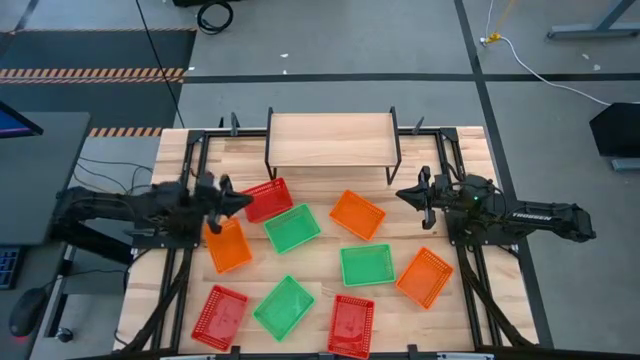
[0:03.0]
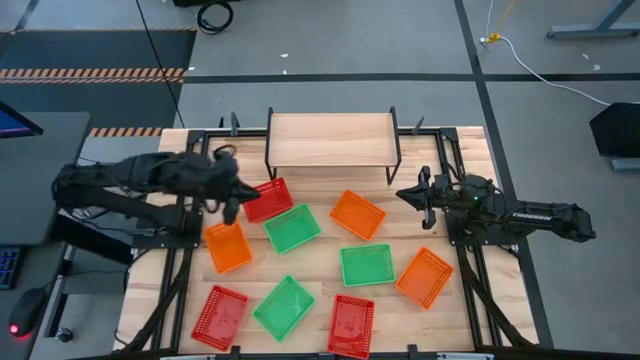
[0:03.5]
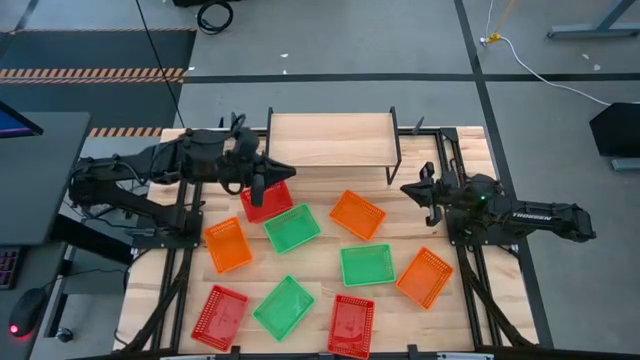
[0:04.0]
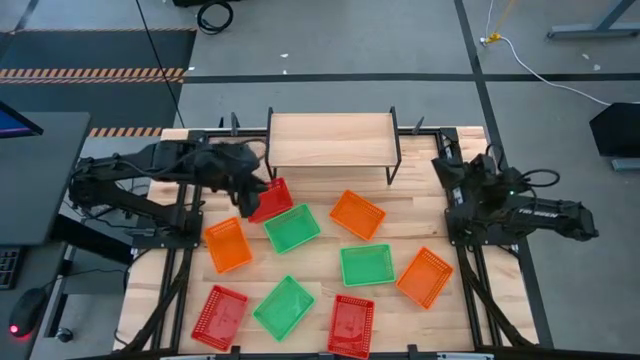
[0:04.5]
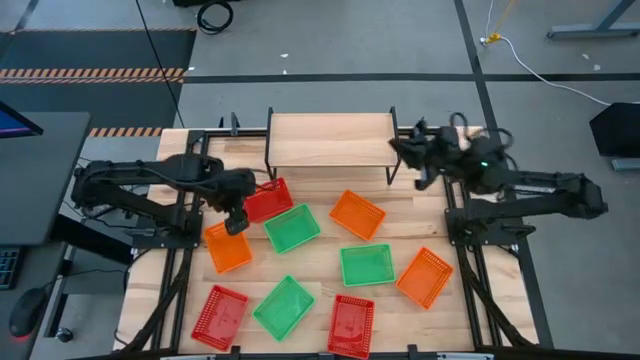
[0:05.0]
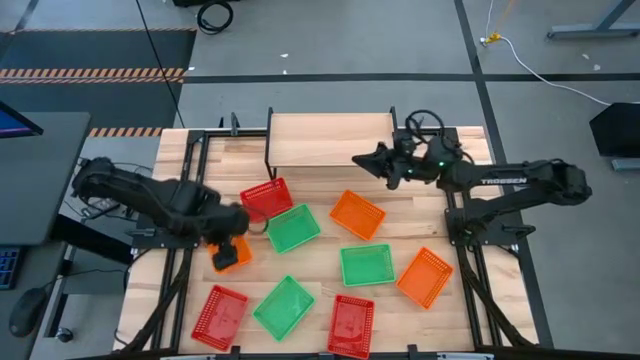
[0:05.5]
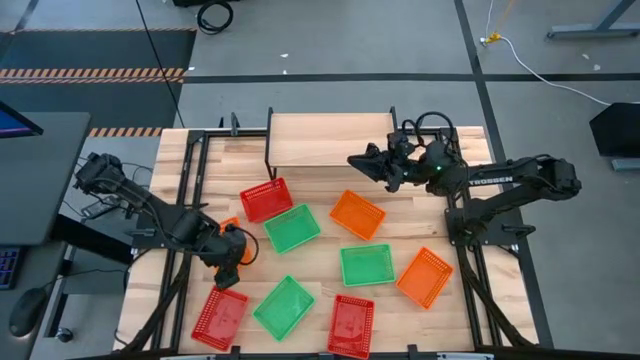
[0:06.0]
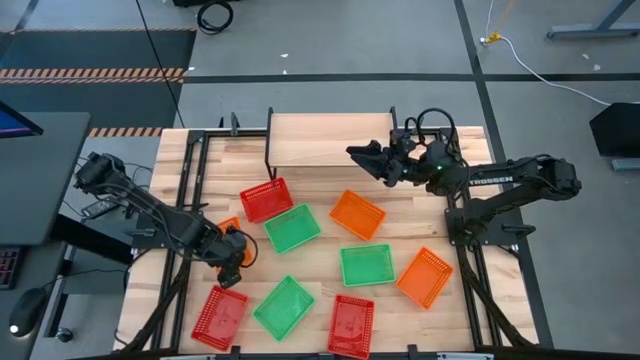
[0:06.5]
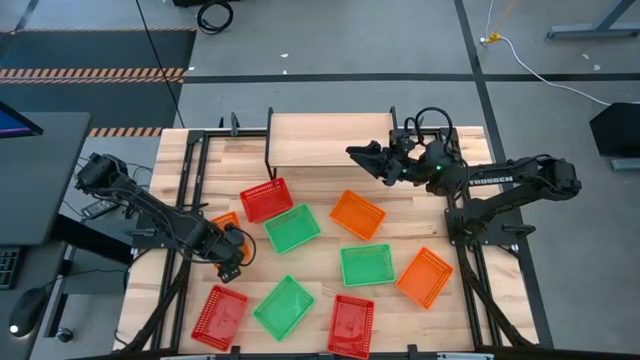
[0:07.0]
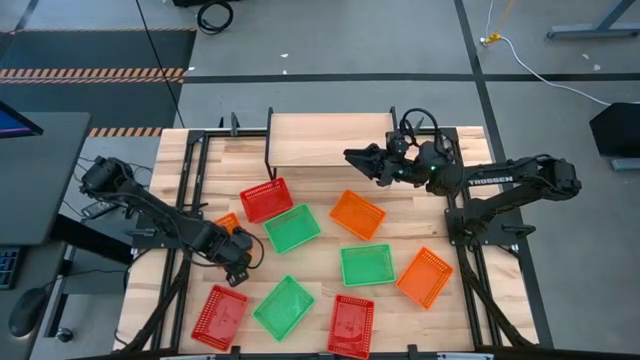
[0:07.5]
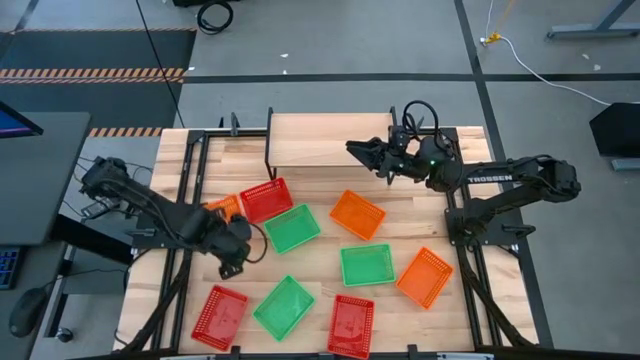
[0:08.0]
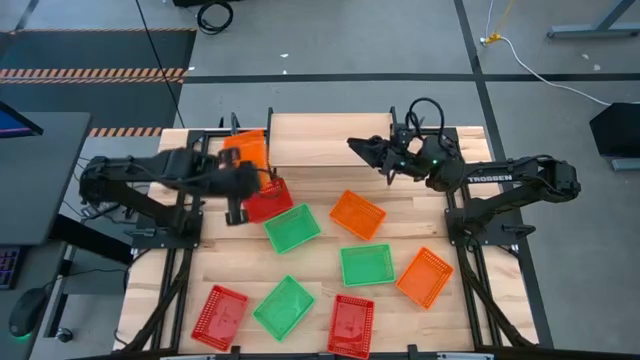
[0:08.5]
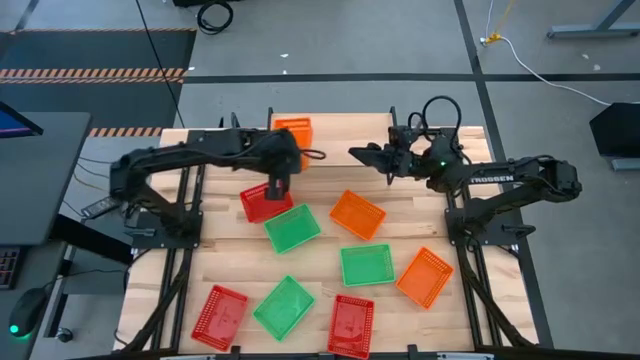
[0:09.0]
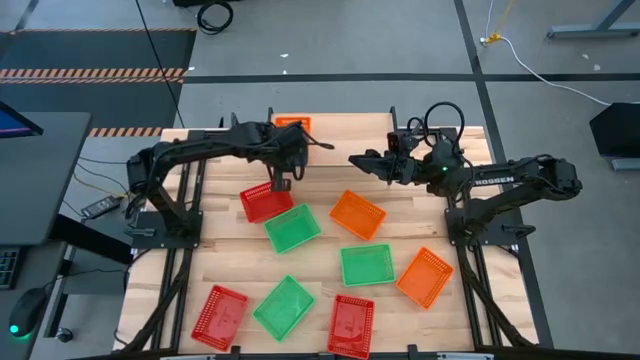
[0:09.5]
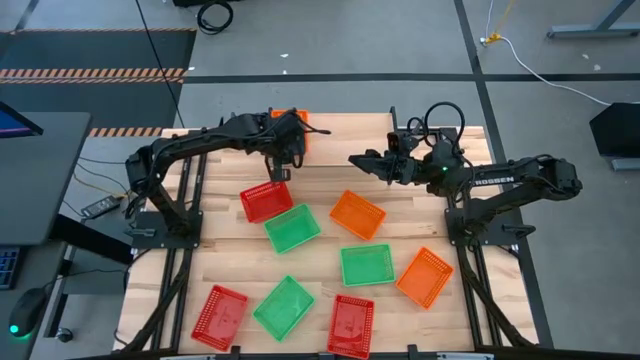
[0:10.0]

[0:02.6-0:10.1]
Task: Stack baskets on shelf by color
Put the top left orange bin on the shelf

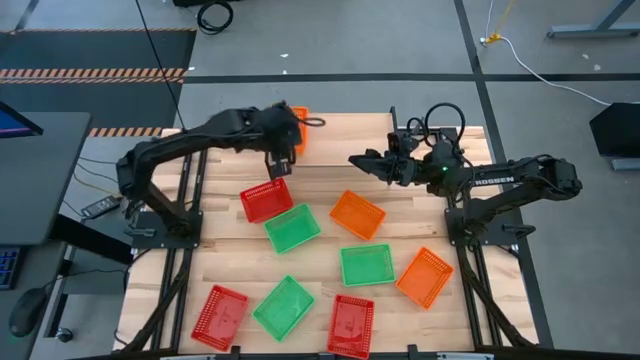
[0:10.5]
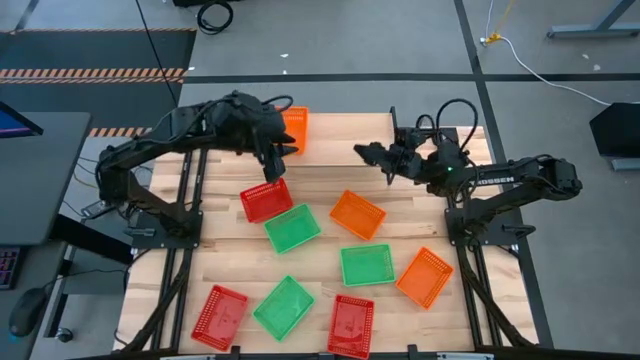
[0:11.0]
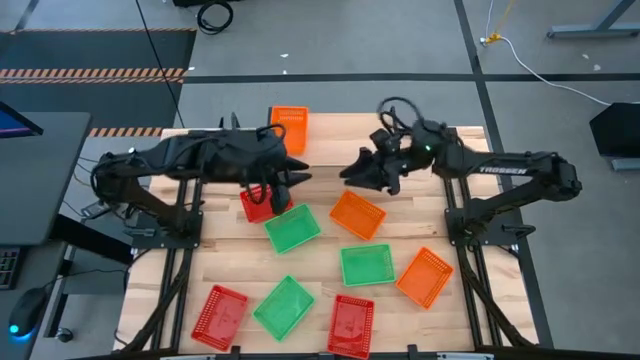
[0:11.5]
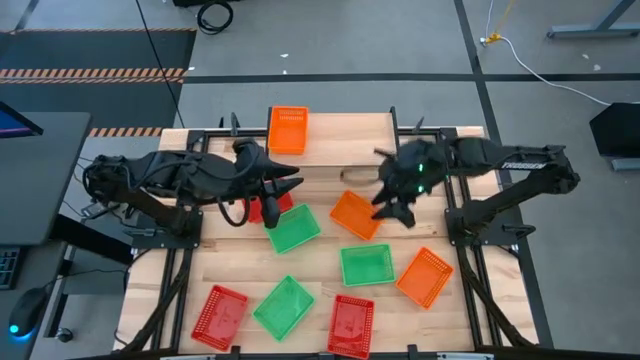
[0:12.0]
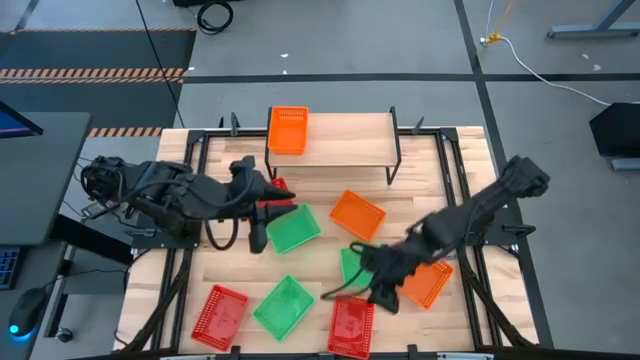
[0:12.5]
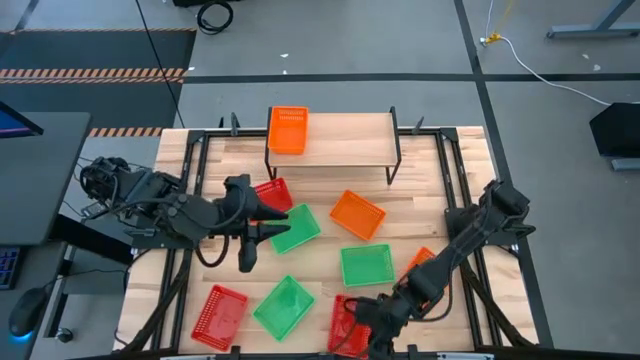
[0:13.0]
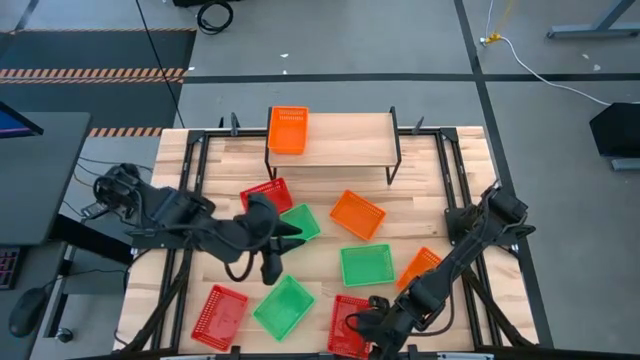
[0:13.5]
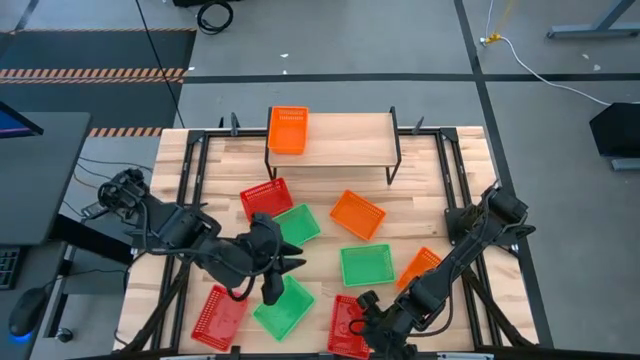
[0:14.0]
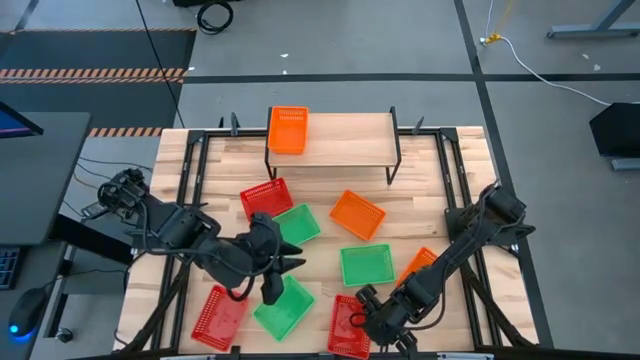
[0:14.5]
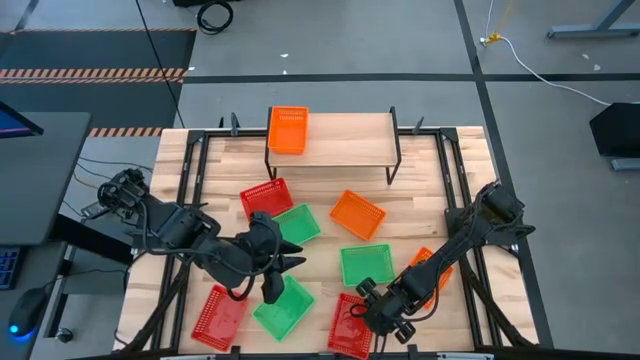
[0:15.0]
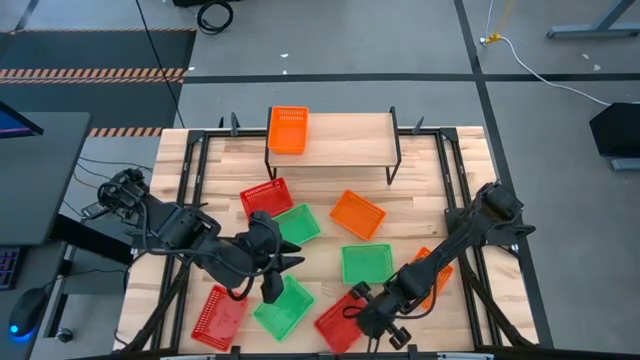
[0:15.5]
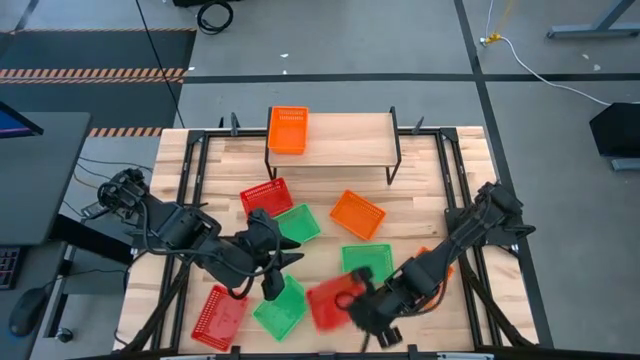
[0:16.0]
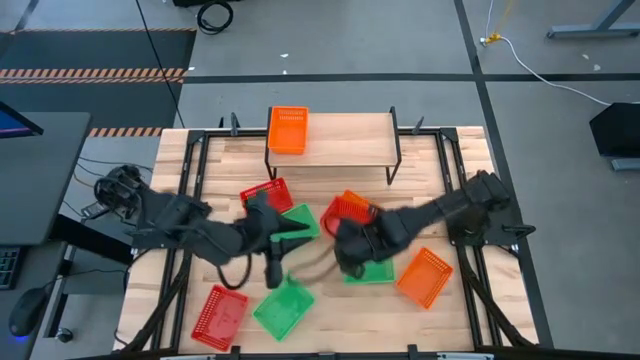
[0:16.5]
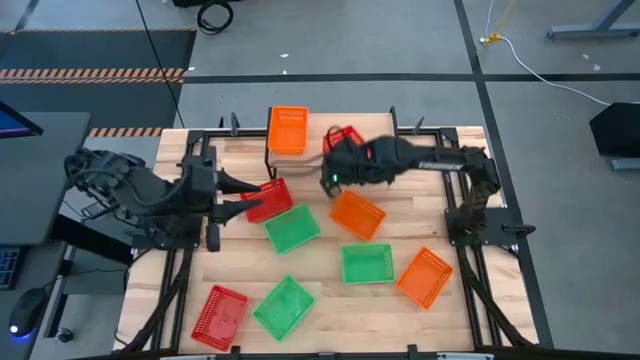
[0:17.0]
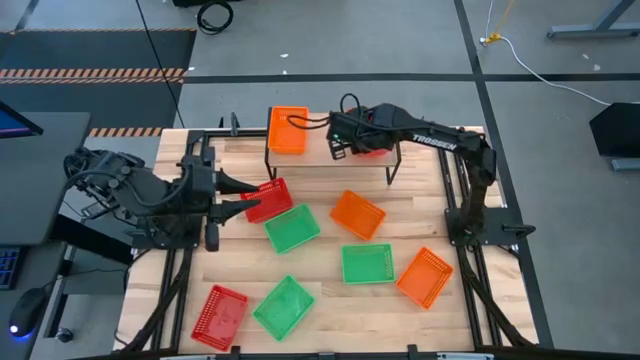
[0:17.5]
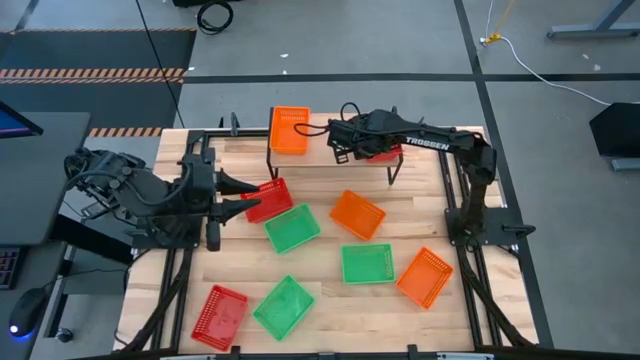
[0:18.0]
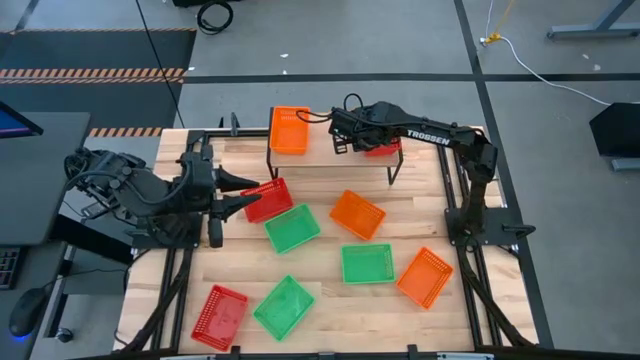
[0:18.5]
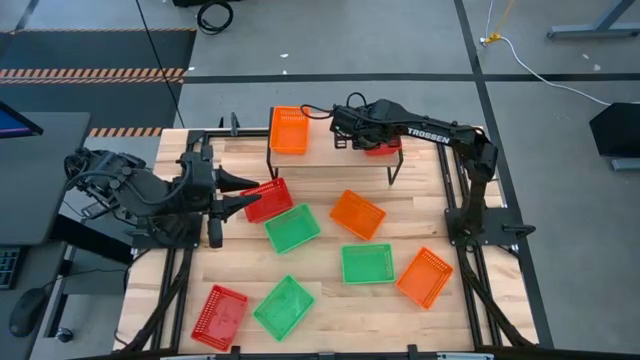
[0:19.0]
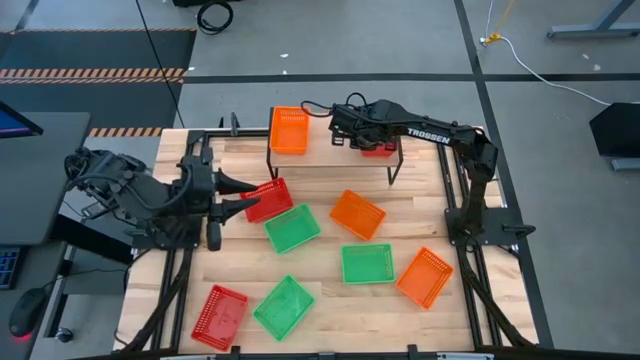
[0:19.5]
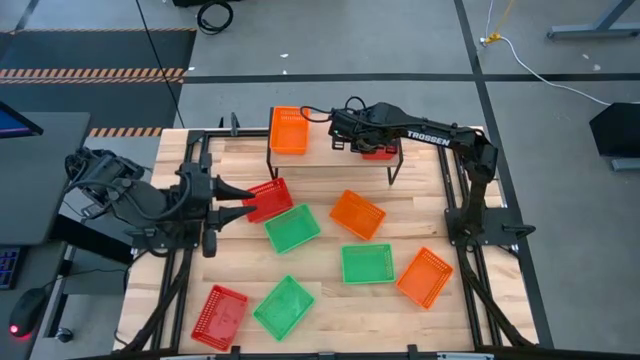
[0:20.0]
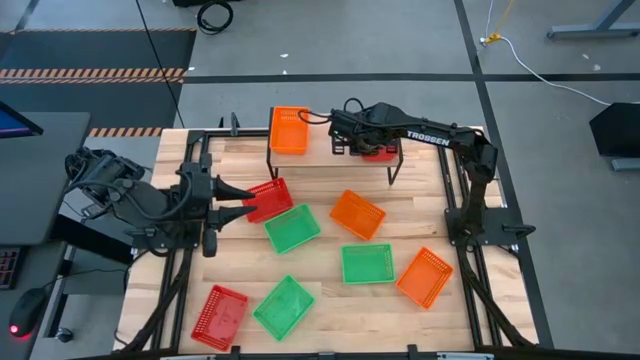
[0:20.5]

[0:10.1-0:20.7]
Put the bottom right red bin on the shelf

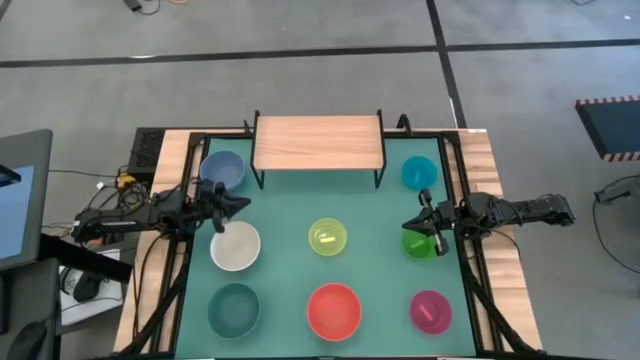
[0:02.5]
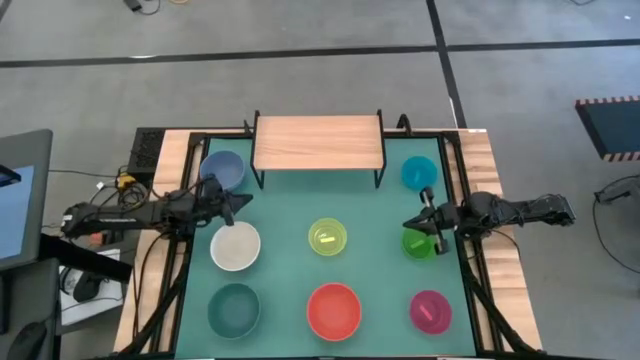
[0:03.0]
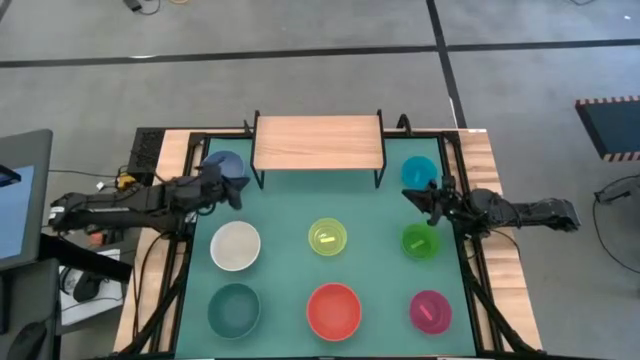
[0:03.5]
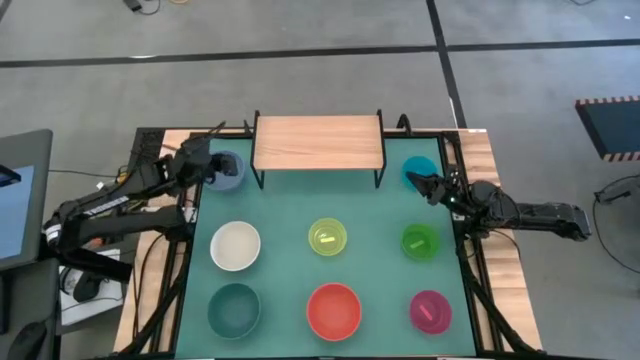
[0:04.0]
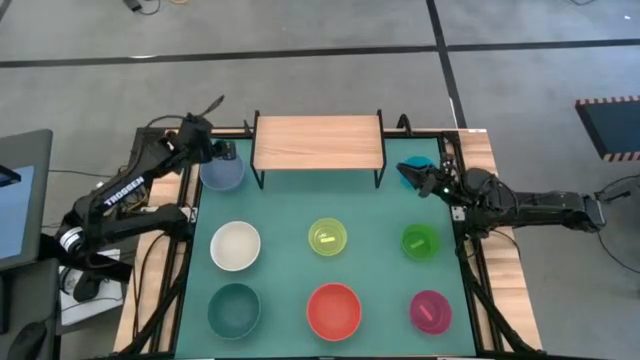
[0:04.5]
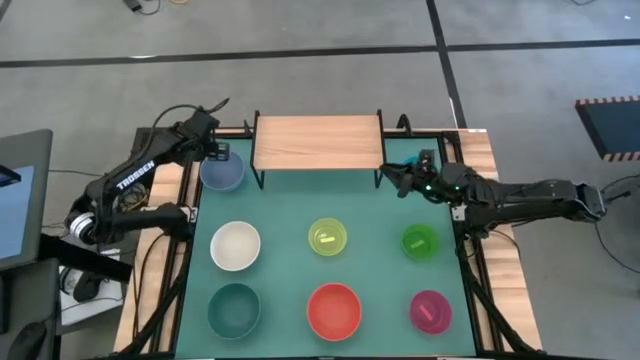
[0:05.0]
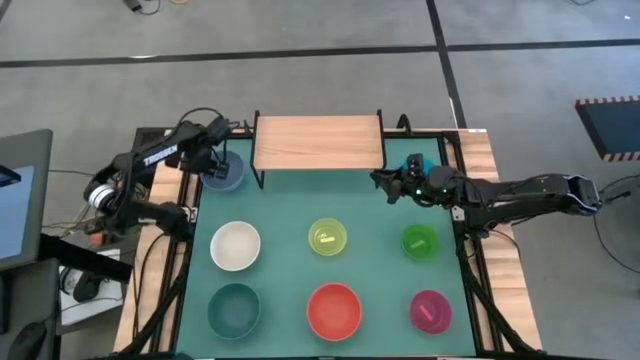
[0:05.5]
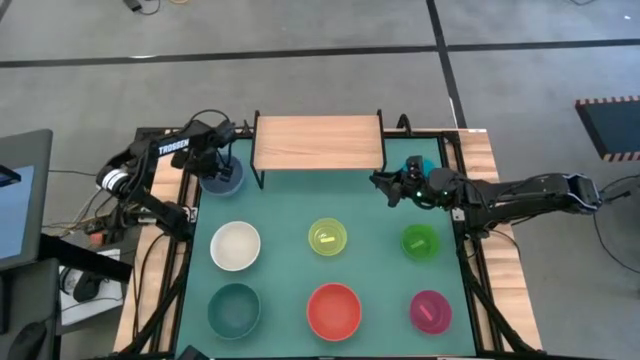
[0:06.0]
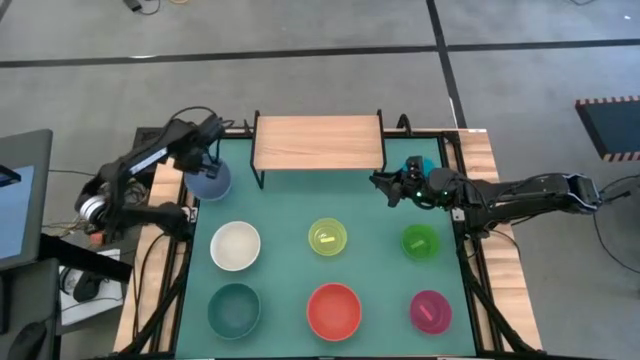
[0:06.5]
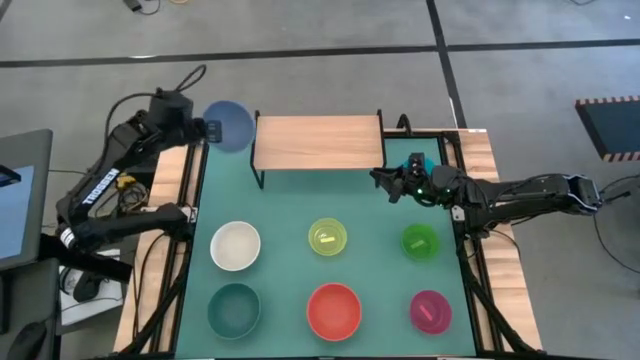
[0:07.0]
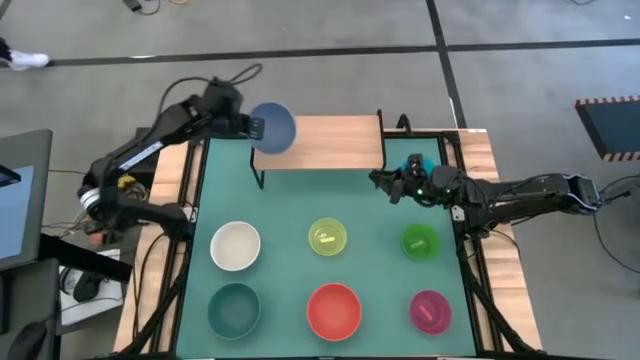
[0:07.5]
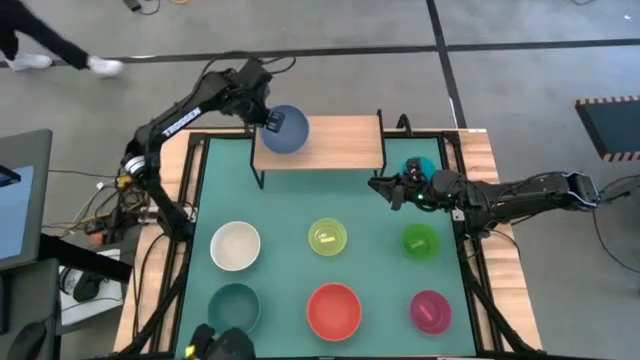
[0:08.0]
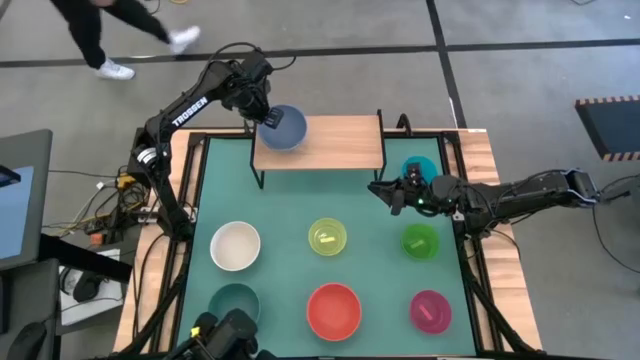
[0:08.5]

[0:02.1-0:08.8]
Task: Place and stack bowls onto a shelf
Put the blue bowl on the shelf
